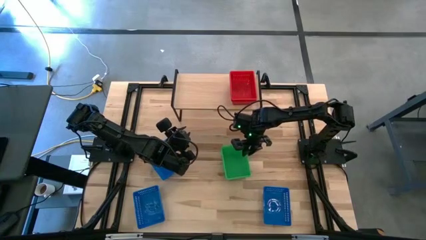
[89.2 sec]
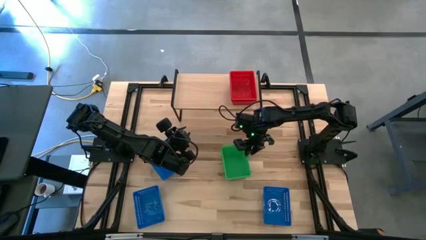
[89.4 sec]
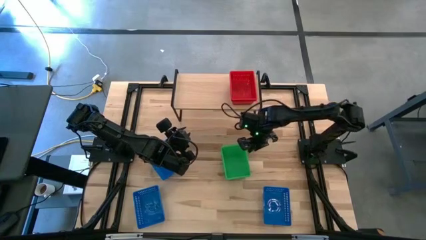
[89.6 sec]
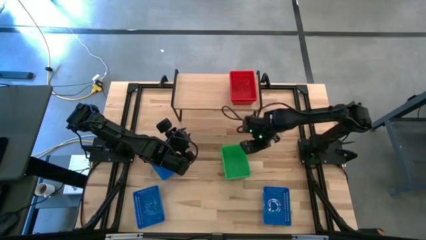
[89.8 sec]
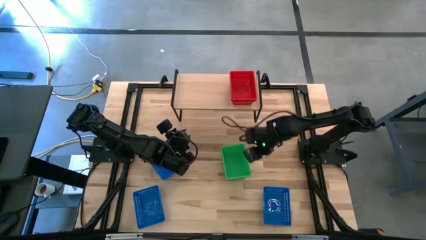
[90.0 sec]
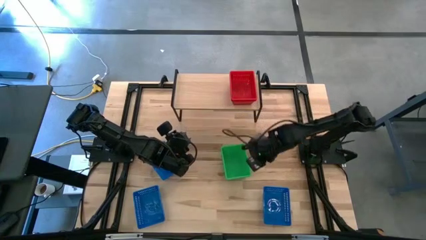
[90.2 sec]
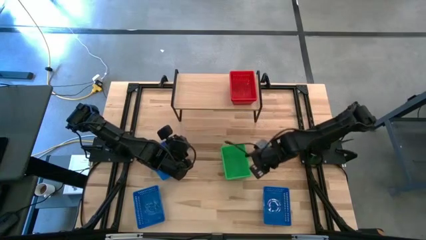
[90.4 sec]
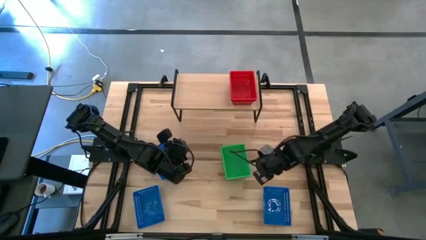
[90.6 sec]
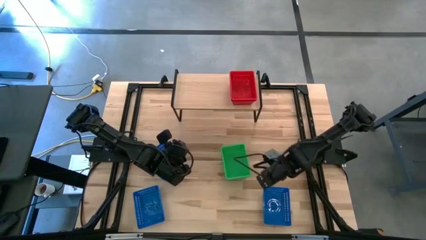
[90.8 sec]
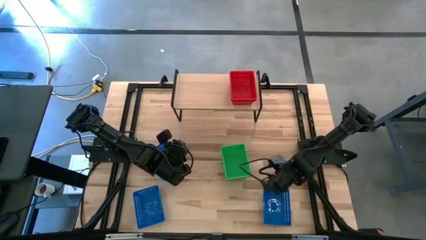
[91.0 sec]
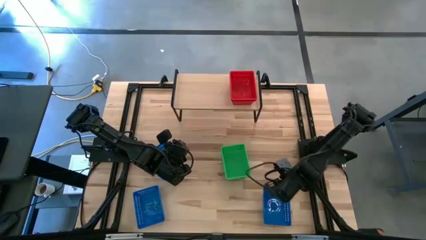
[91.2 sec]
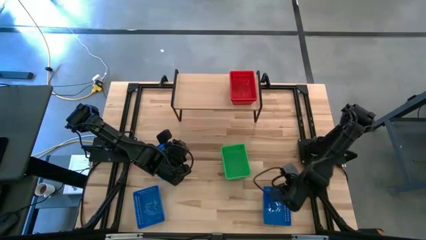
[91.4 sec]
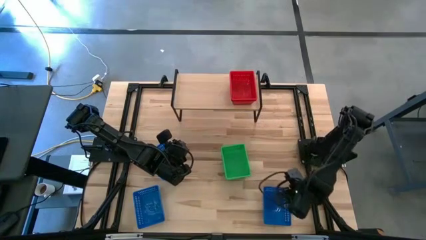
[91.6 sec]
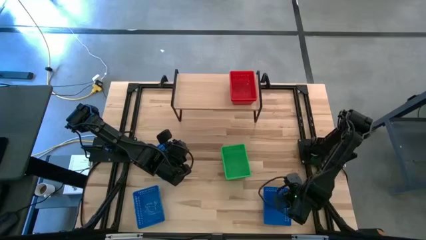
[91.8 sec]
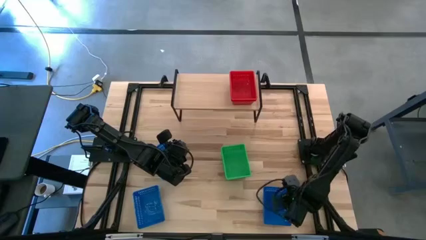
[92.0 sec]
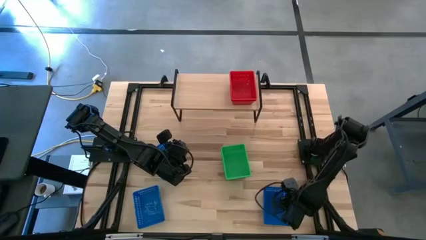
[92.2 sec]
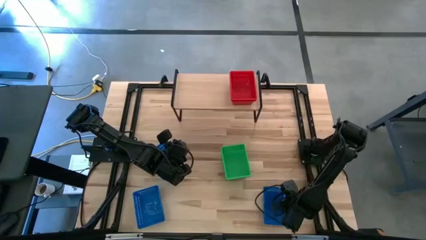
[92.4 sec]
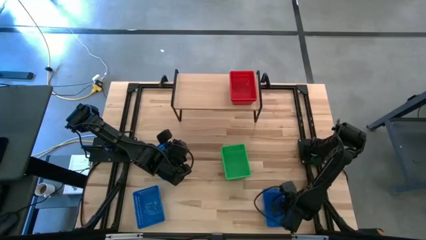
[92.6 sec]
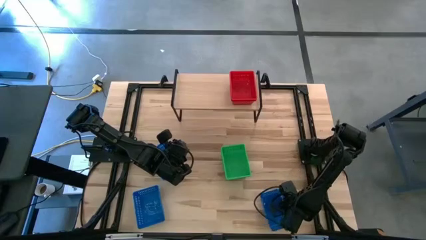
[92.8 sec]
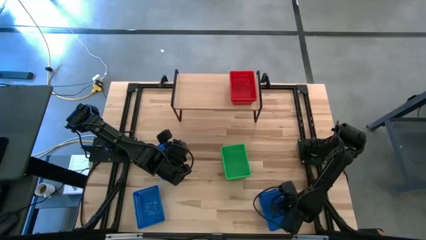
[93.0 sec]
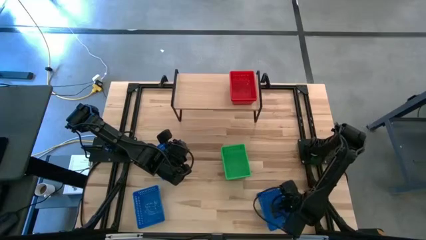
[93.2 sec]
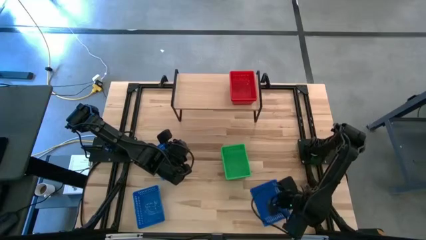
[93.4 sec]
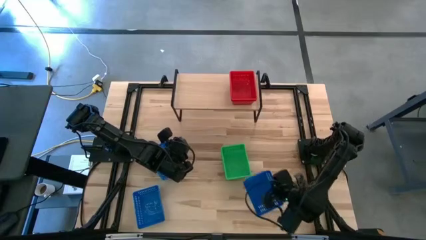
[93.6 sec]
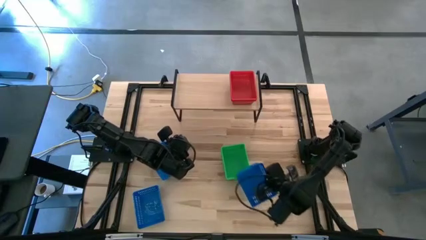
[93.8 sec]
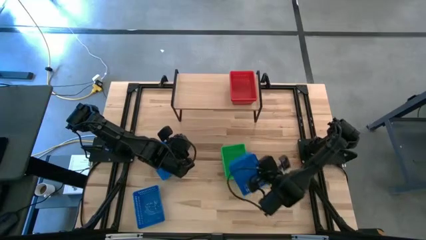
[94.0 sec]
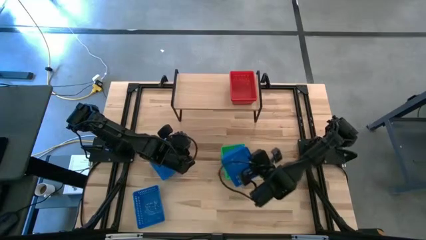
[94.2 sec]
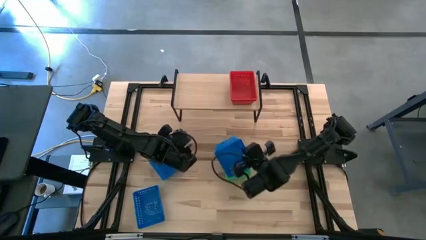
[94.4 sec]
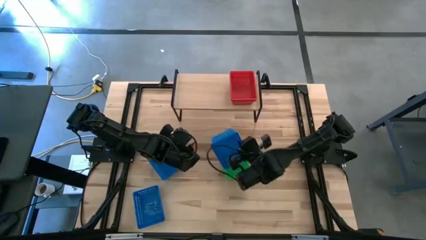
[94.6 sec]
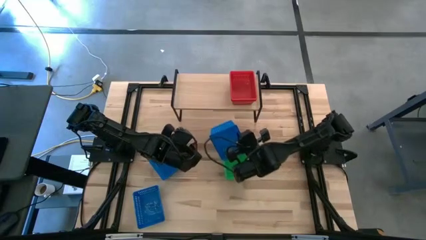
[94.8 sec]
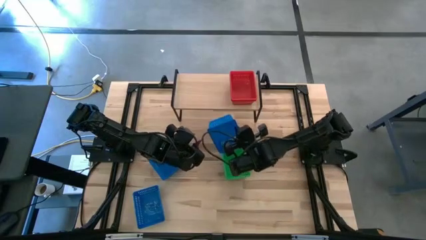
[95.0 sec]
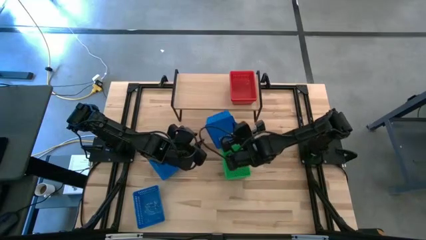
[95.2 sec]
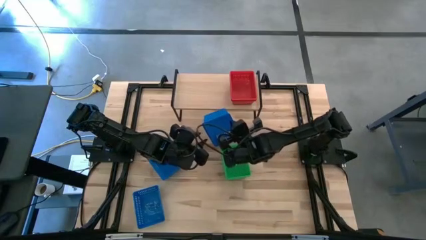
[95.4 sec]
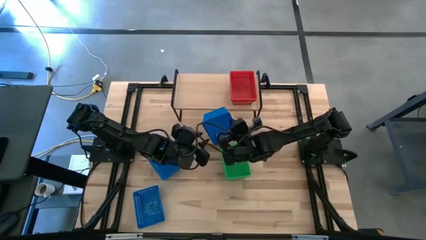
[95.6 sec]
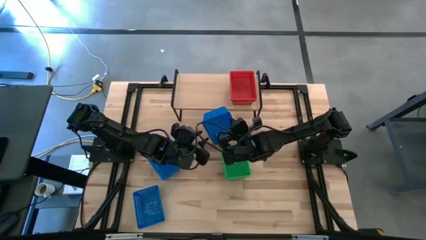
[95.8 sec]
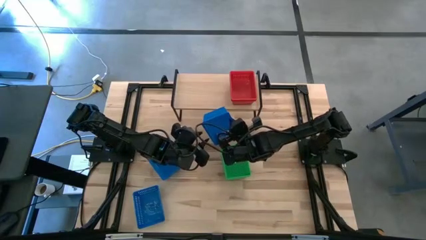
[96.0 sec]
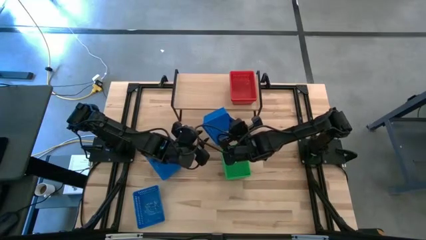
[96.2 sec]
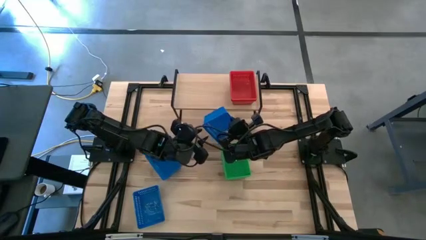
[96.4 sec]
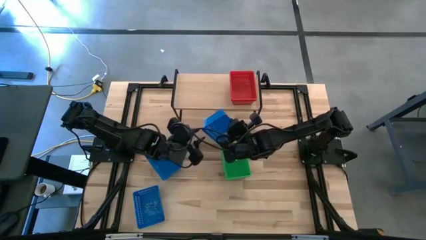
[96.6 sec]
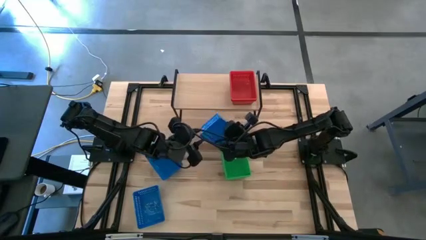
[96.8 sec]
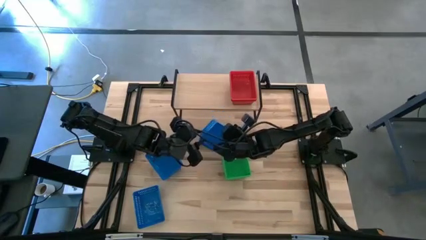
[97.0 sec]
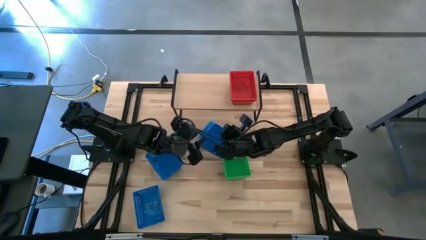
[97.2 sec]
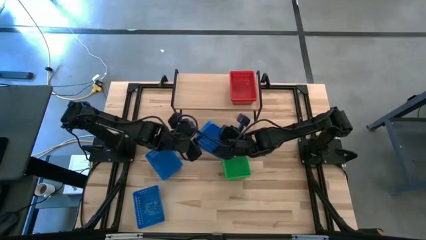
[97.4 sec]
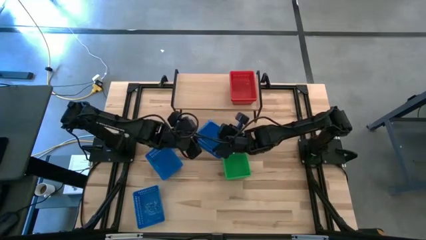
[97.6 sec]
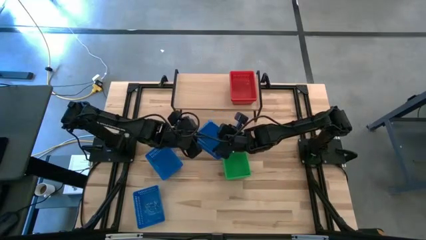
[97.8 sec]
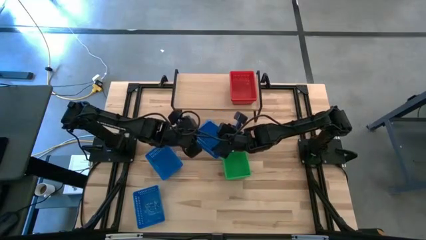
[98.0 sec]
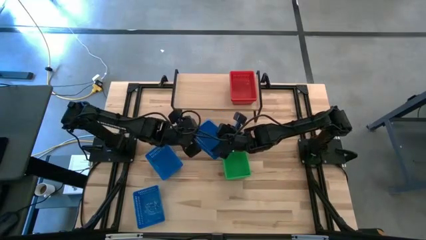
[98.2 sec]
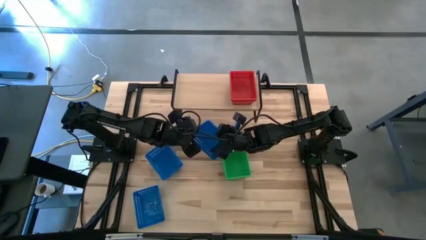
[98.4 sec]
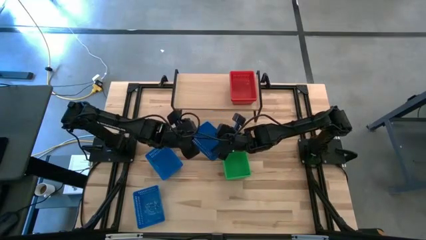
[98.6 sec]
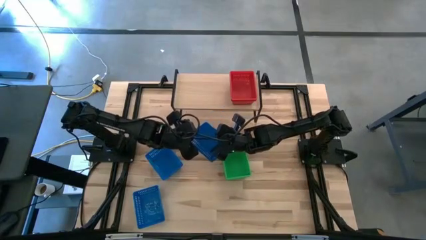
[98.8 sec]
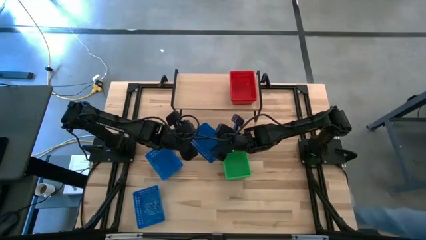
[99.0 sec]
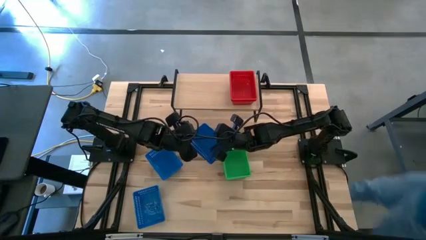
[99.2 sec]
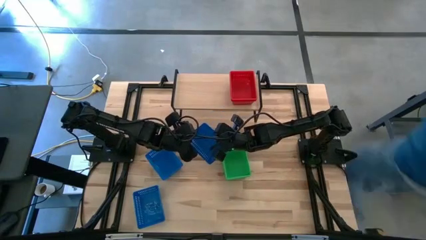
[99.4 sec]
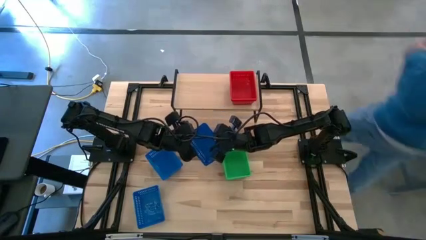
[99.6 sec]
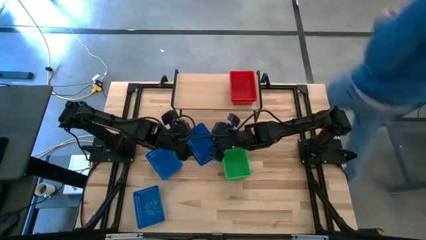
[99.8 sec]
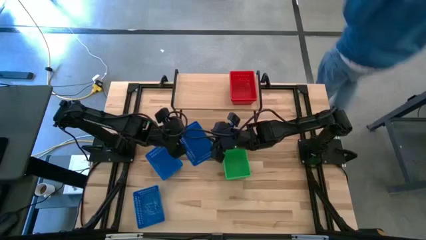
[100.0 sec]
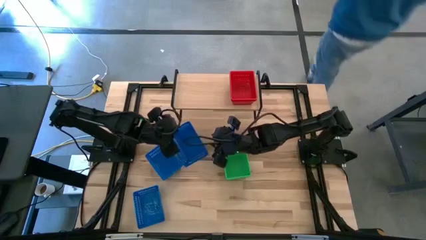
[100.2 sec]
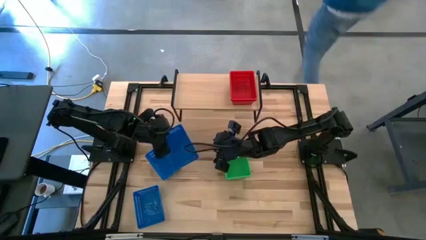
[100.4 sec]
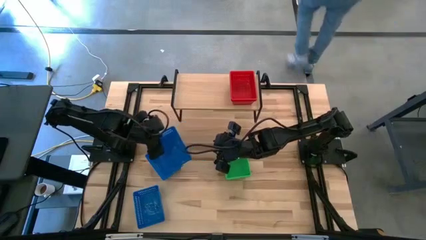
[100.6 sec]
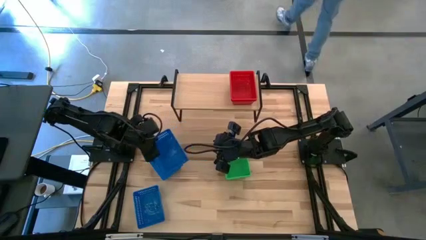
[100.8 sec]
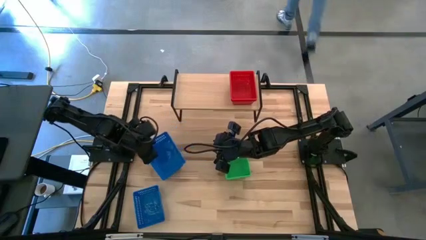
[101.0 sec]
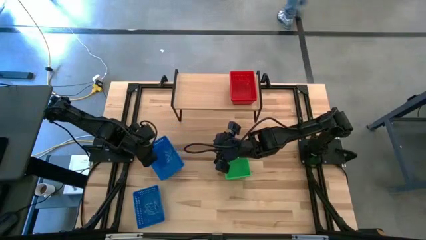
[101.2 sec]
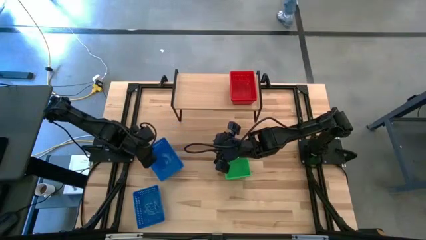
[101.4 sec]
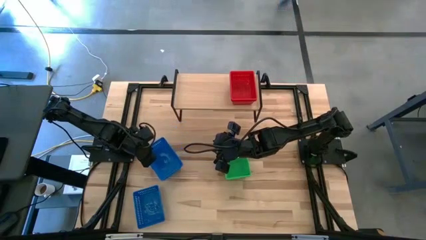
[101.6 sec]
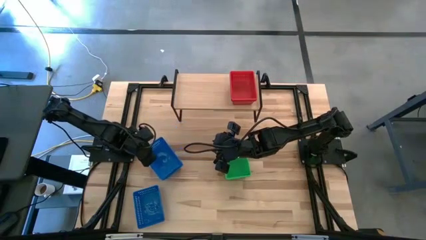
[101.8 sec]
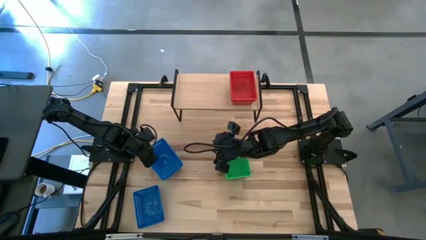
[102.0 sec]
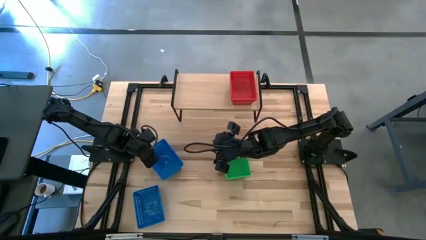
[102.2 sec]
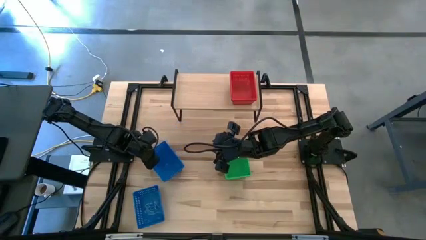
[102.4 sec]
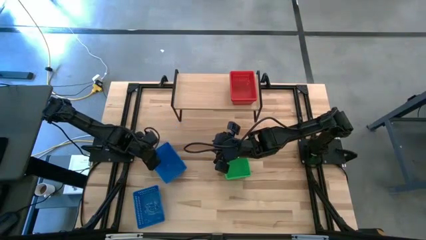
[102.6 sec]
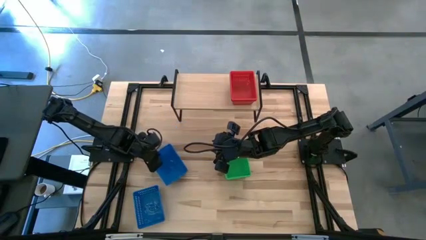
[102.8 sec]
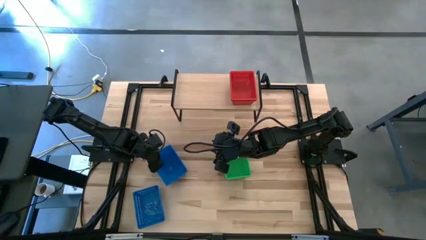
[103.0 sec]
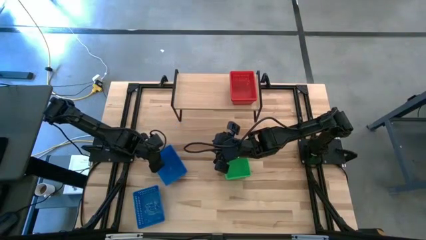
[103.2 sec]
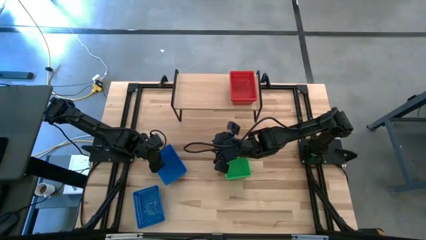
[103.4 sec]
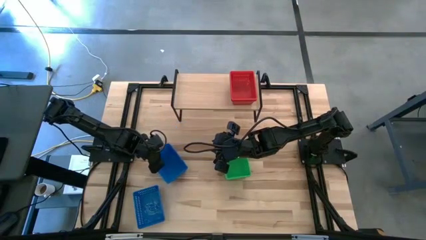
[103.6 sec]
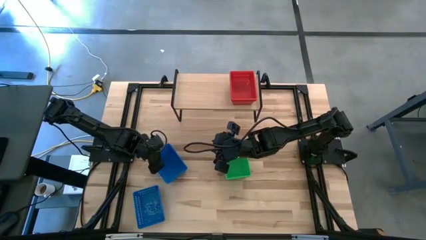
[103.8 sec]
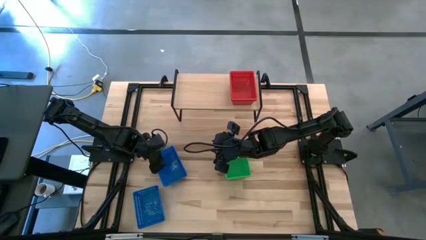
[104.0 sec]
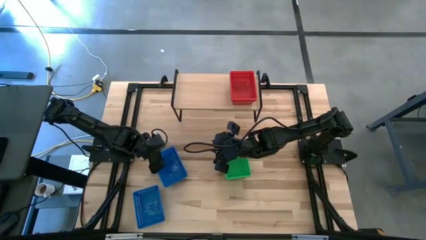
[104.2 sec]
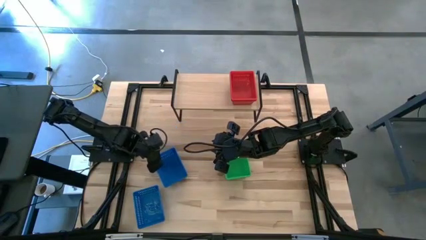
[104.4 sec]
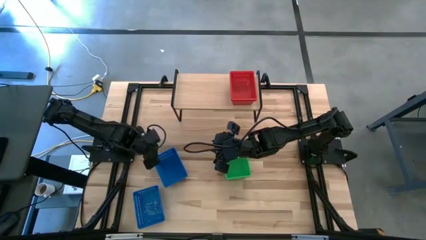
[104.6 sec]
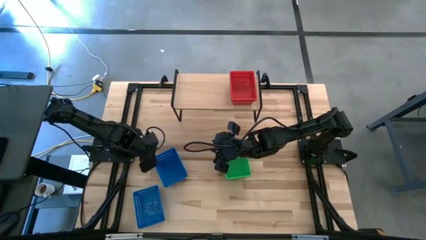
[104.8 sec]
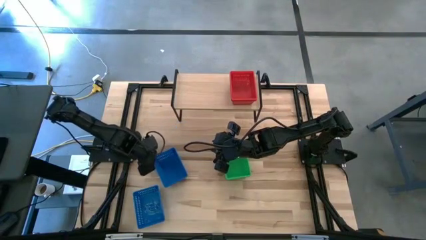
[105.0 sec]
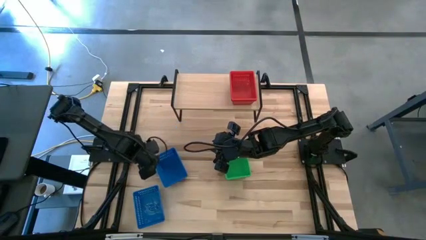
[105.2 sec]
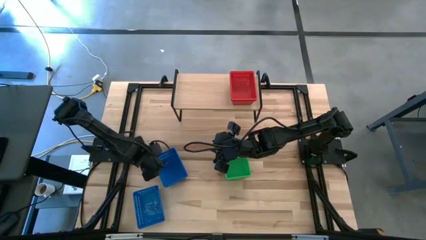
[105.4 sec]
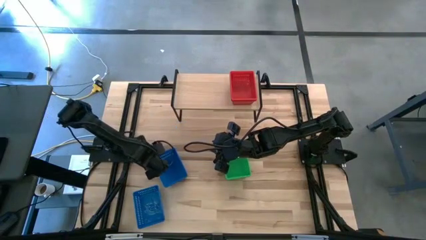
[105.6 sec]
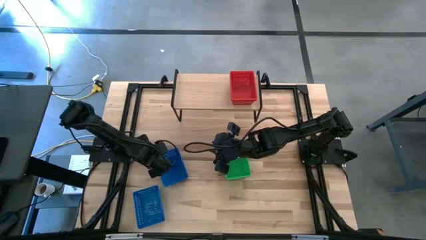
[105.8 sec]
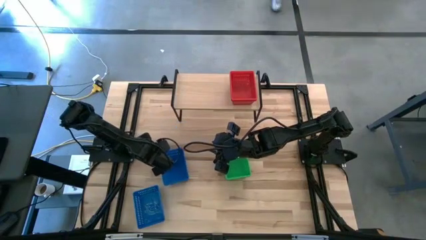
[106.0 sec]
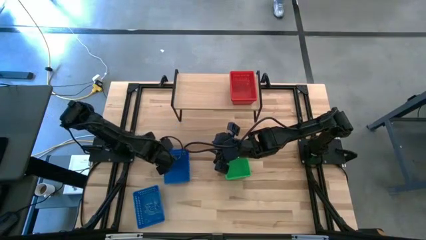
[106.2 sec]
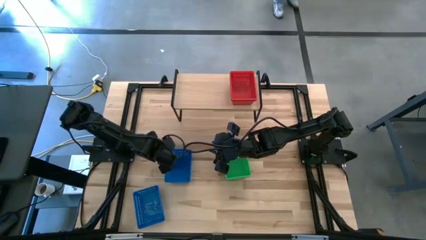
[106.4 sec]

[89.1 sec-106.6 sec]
Task: Stack baskets on shelf by color
Stack the bottom right blue basket on the top of the top blue basket
